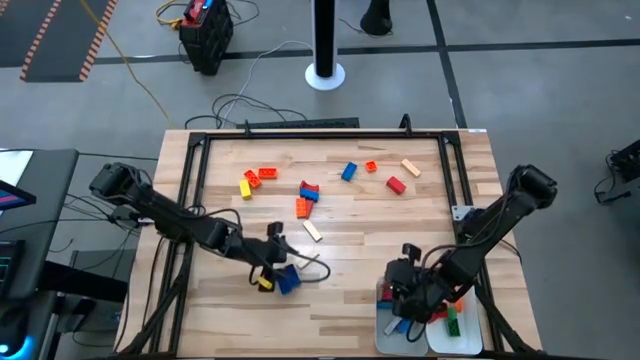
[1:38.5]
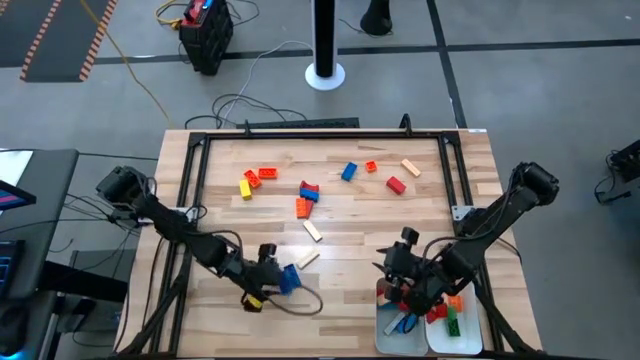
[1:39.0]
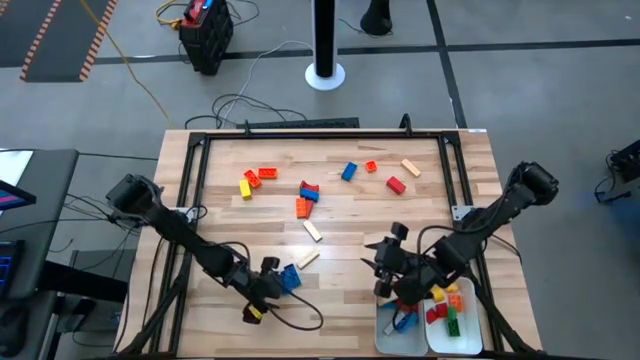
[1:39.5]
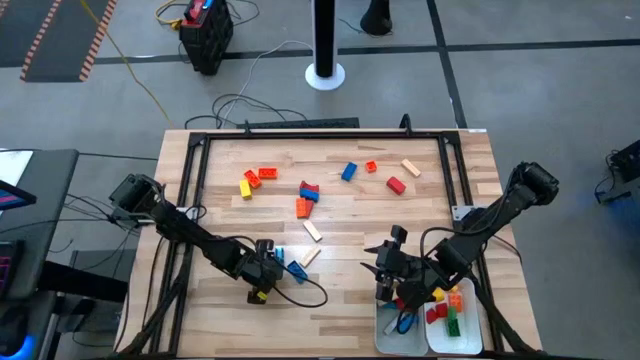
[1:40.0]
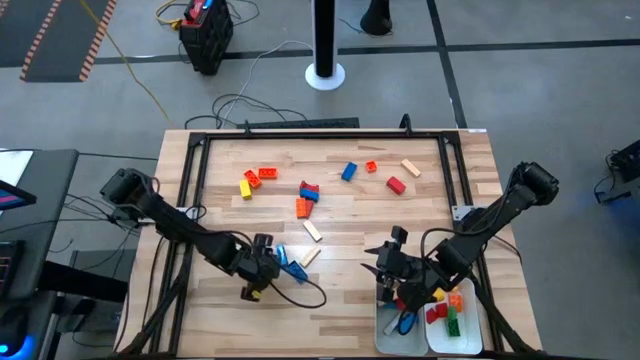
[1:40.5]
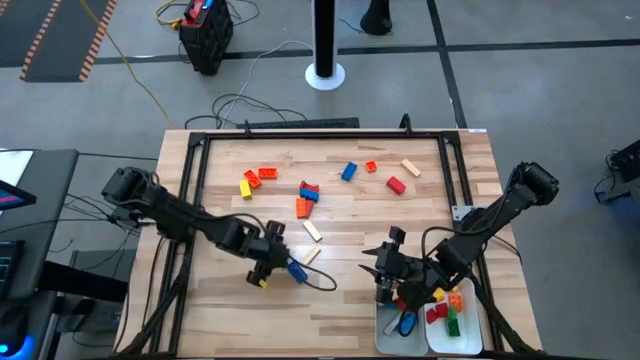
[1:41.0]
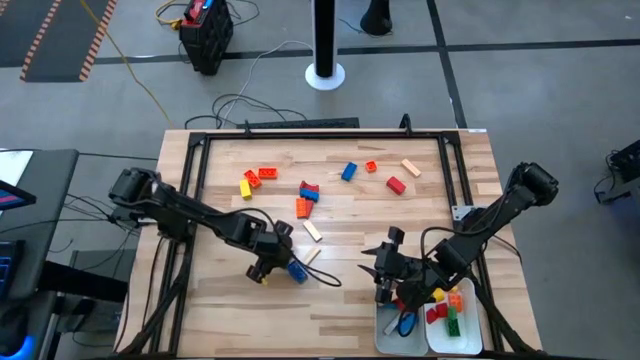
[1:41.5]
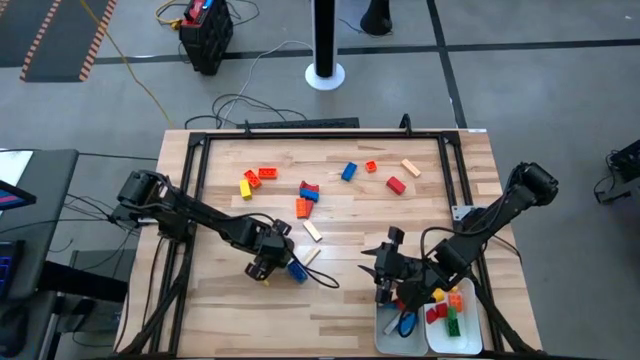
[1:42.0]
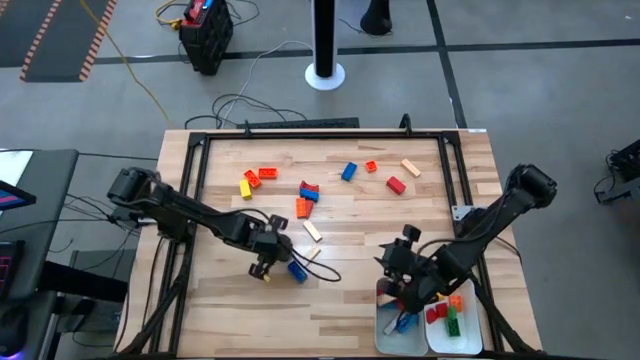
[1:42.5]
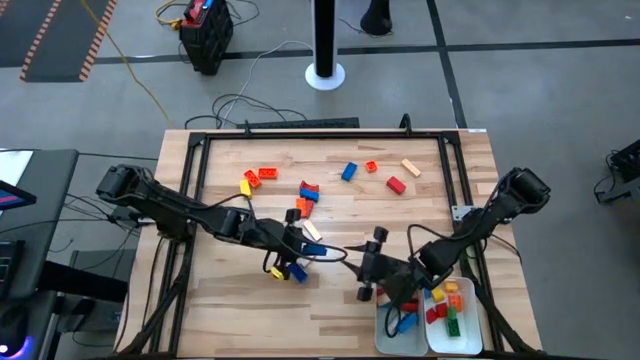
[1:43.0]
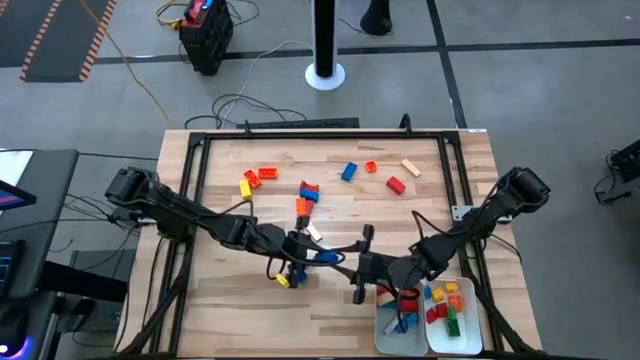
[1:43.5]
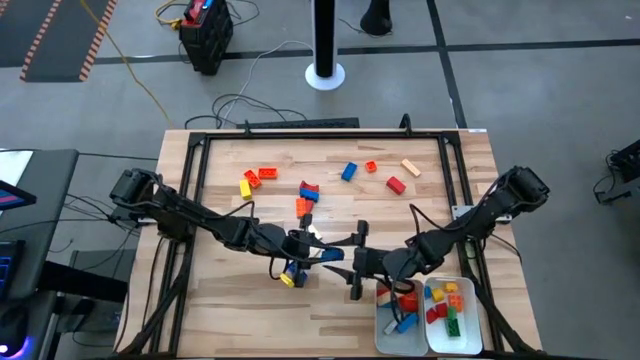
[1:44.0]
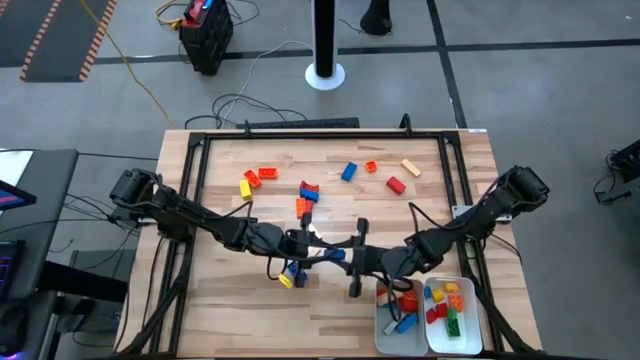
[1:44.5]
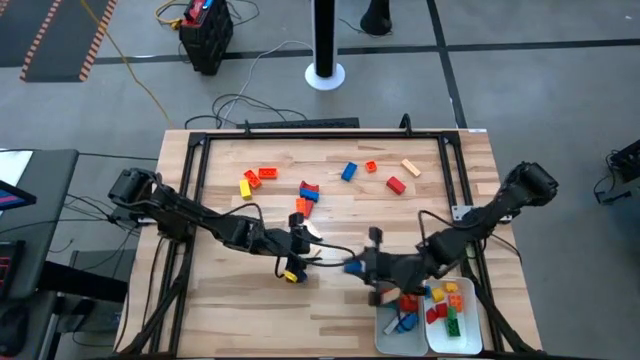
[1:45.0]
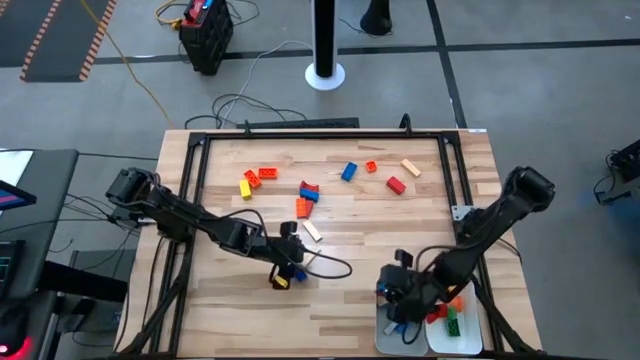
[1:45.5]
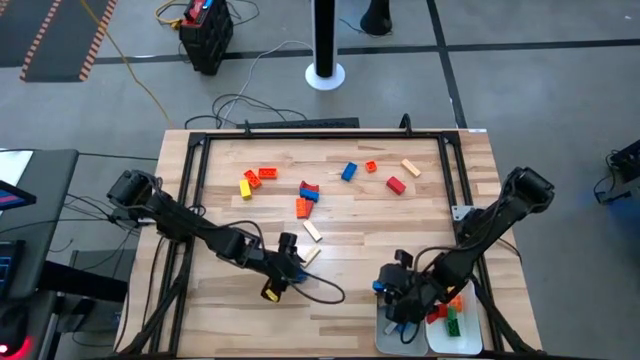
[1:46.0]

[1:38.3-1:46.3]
Task: Sort blocks by size
Put the large blue game piece into the gray bin

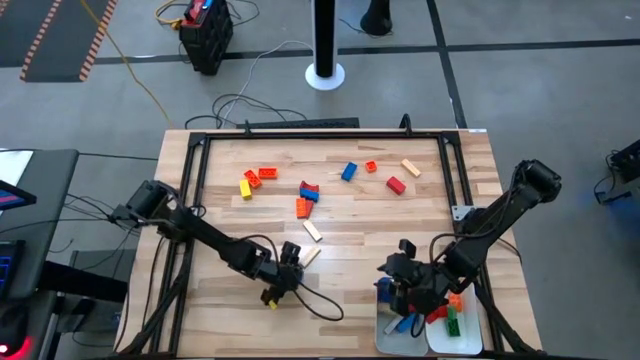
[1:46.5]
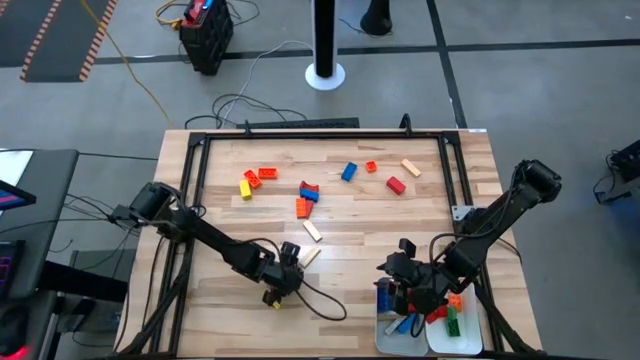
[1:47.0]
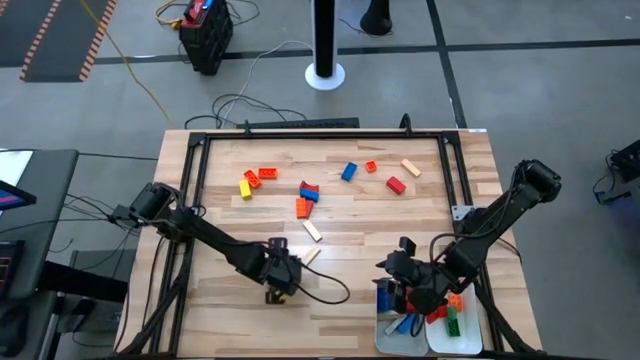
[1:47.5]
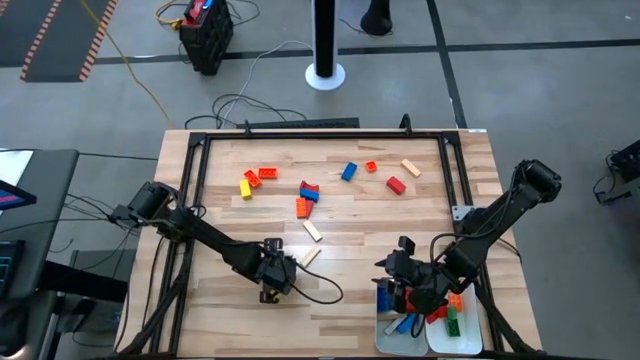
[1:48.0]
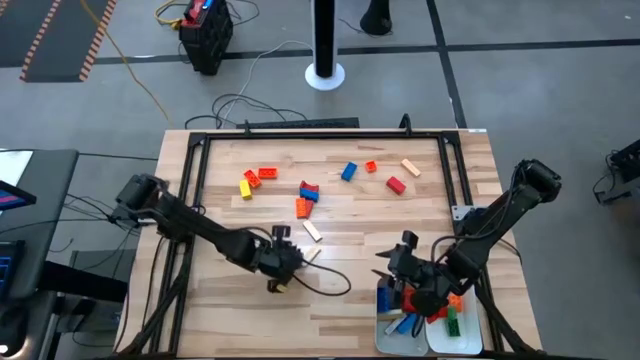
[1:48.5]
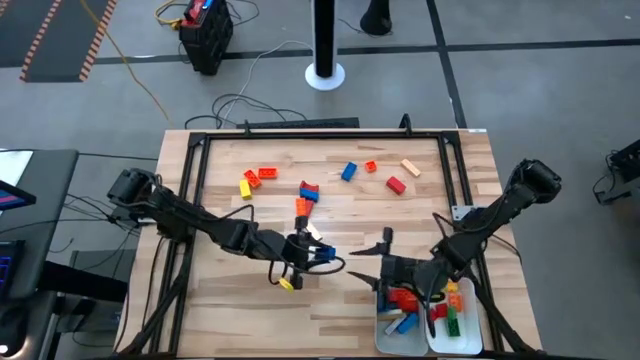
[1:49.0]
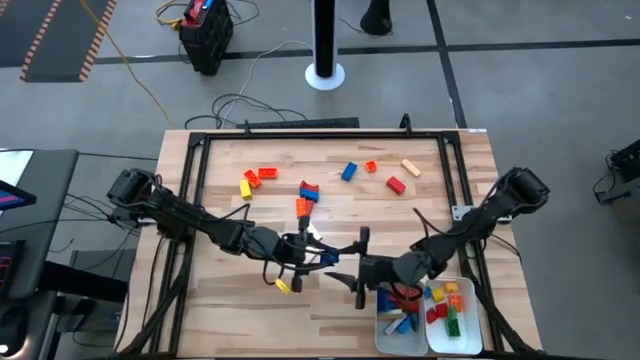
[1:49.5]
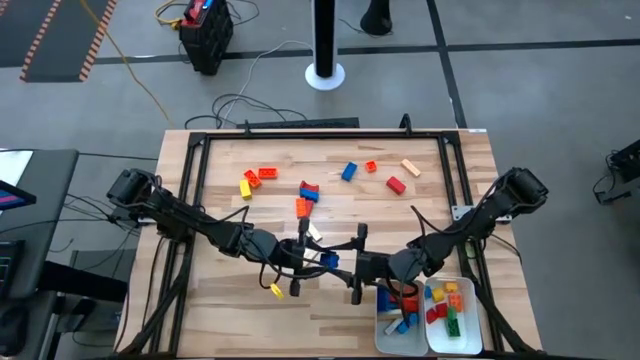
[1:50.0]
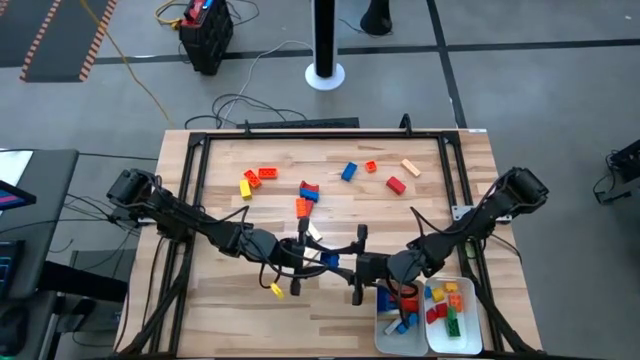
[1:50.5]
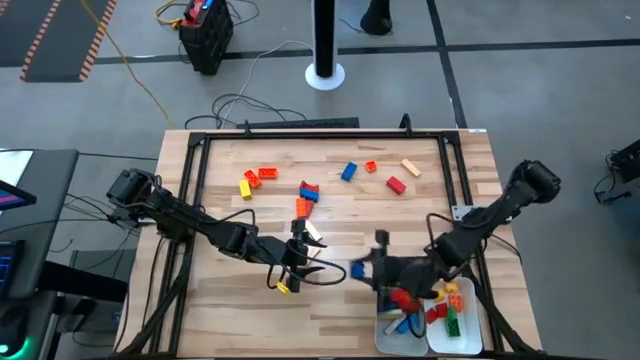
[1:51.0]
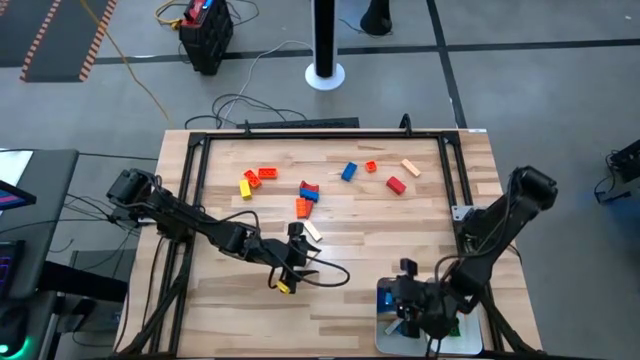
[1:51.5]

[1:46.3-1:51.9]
Put the large blue game piece into the gray bin

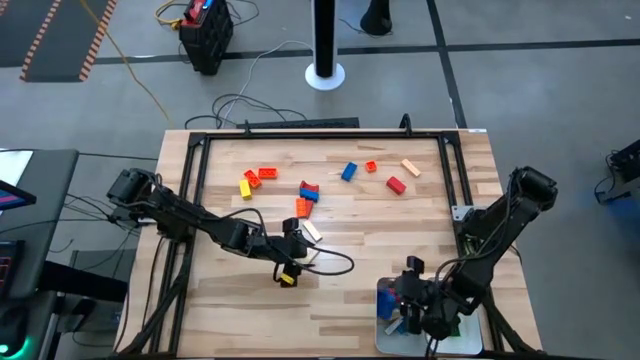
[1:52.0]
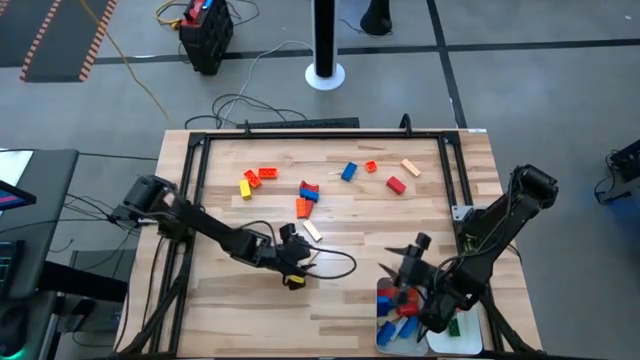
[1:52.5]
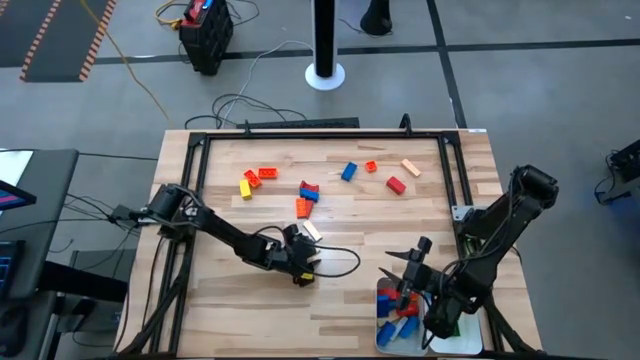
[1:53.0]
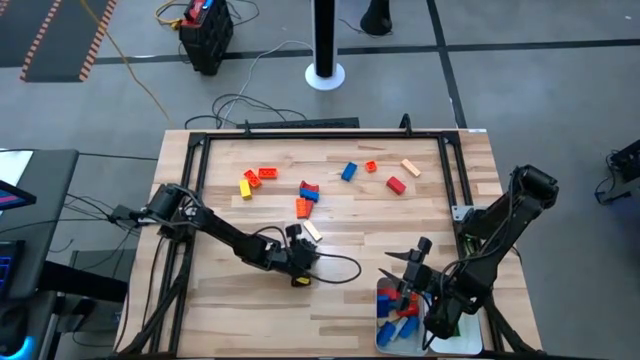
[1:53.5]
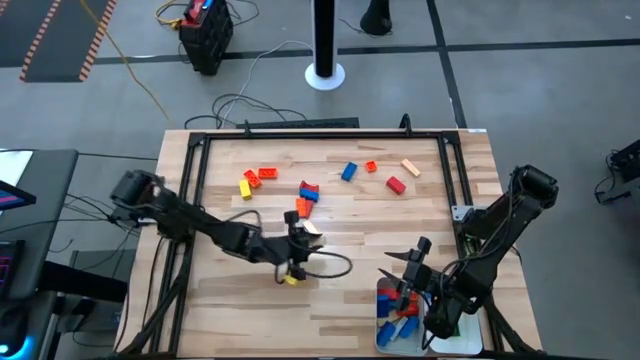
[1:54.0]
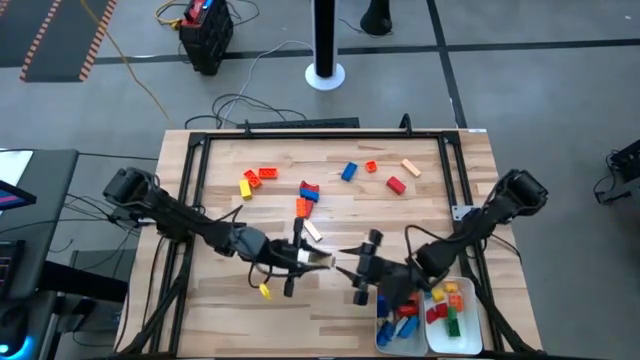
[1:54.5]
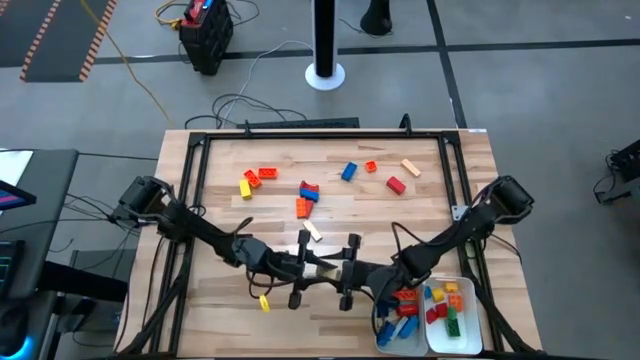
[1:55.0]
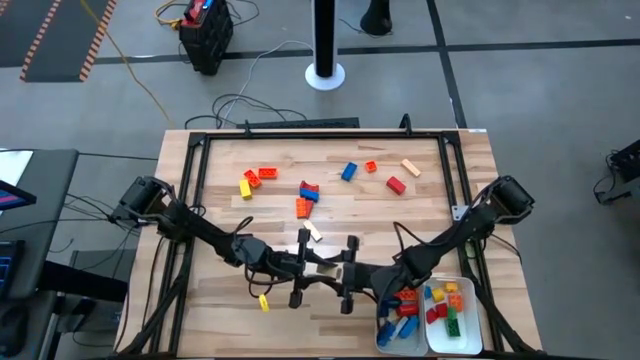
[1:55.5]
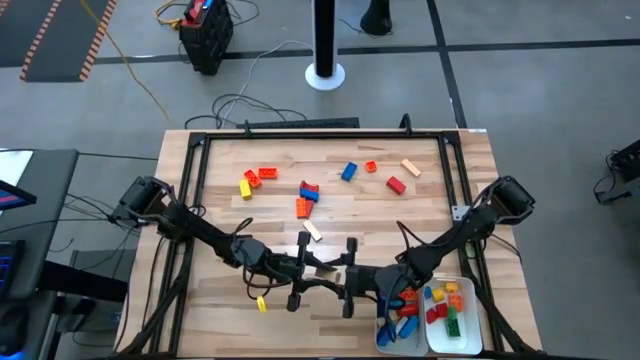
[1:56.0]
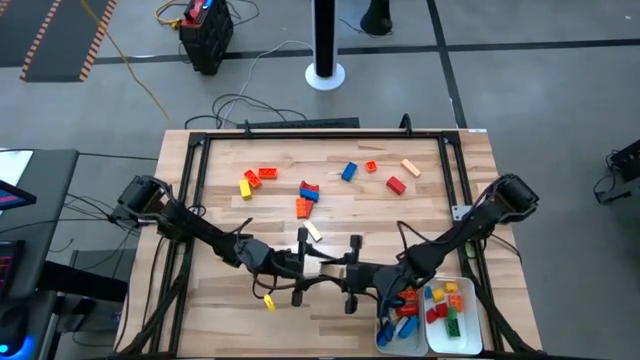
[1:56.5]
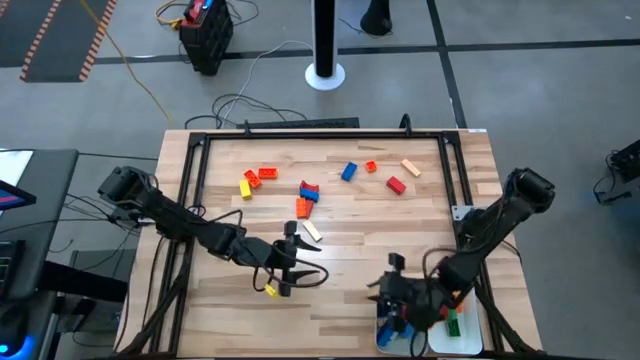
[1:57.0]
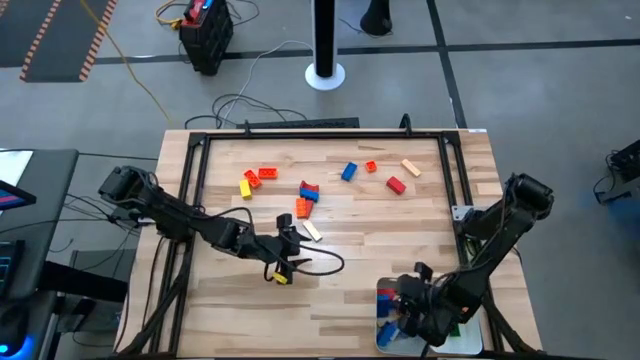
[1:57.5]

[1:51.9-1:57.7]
Put the large light brown wooden block into the gray bin

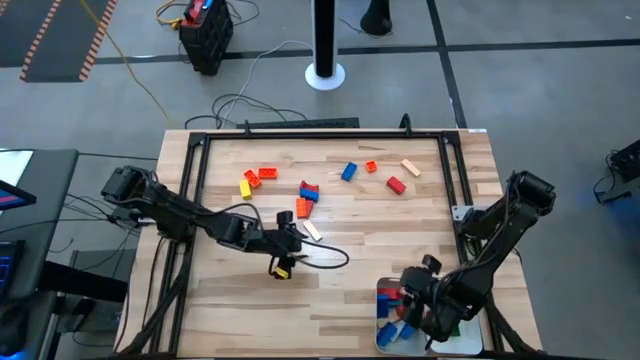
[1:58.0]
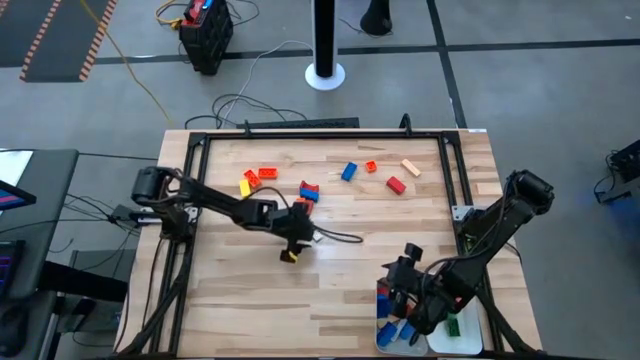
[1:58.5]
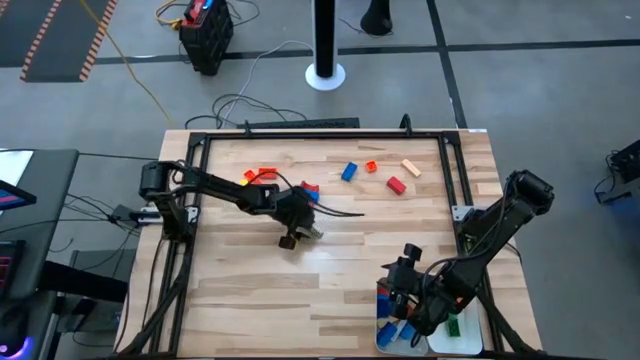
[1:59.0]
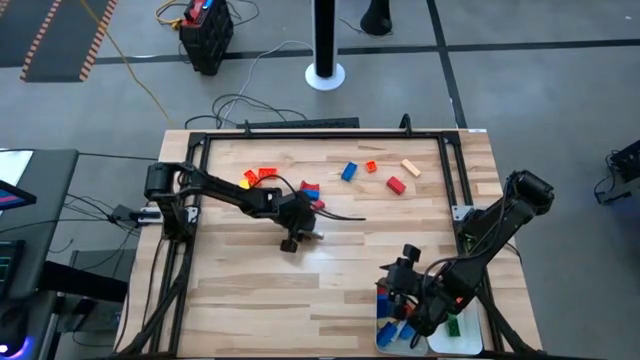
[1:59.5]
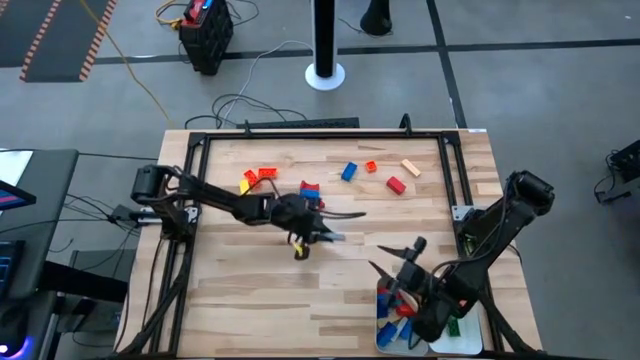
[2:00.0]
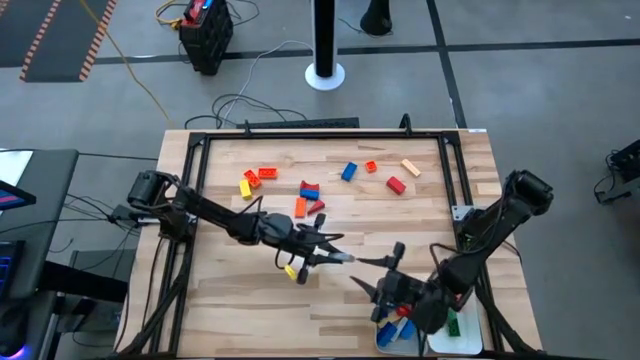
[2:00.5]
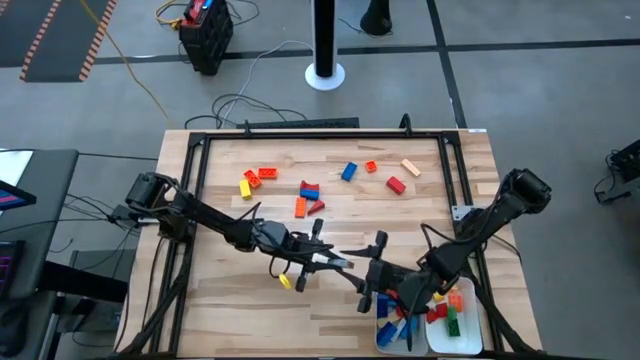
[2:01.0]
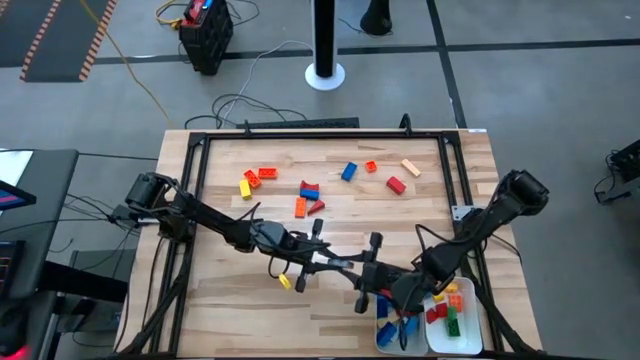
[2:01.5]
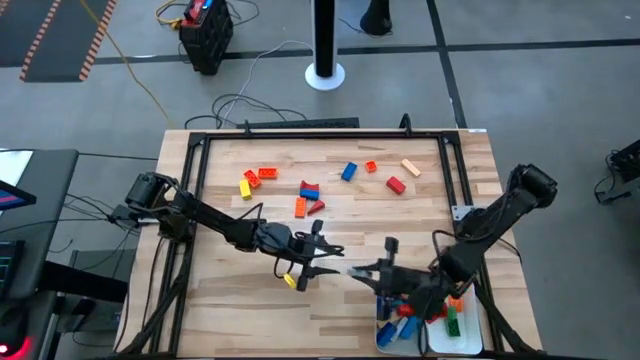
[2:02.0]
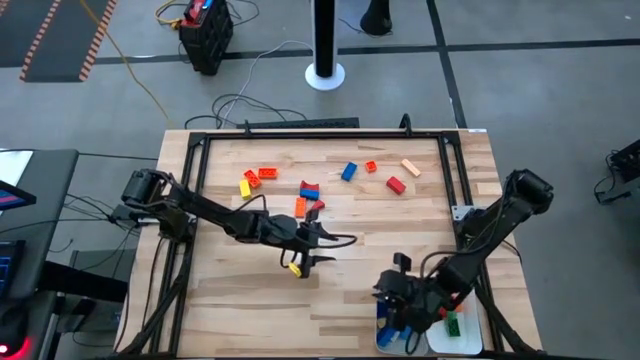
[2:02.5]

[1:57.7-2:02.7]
Put the large light brown wooden block into the gray bin
